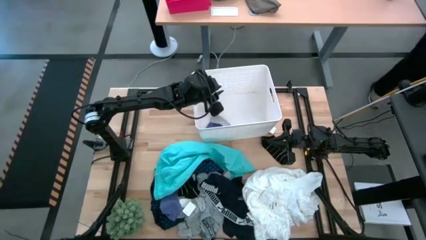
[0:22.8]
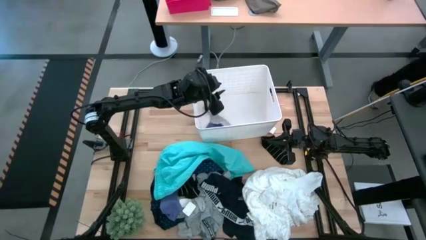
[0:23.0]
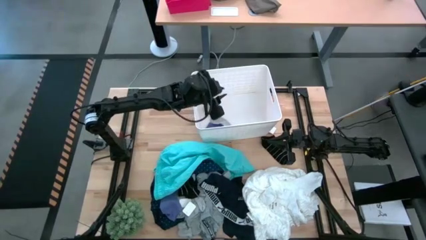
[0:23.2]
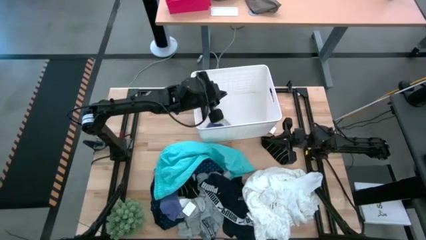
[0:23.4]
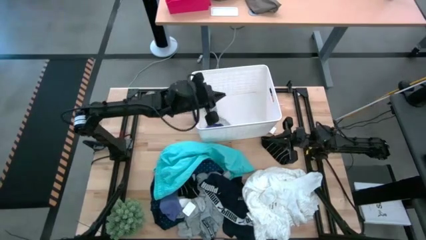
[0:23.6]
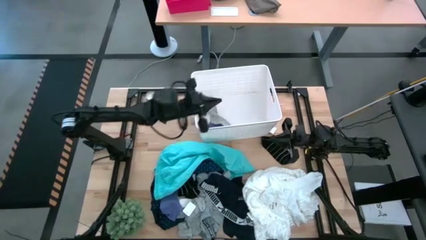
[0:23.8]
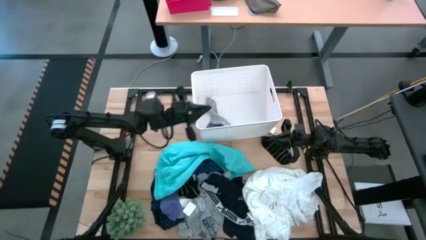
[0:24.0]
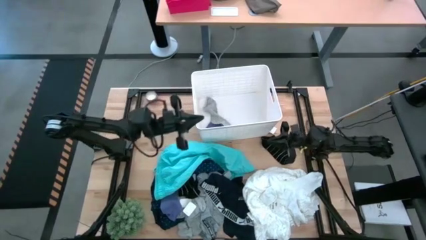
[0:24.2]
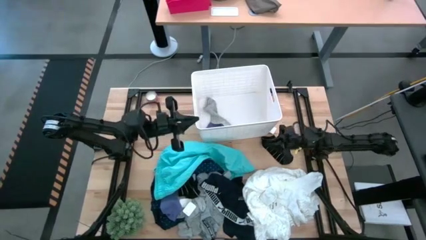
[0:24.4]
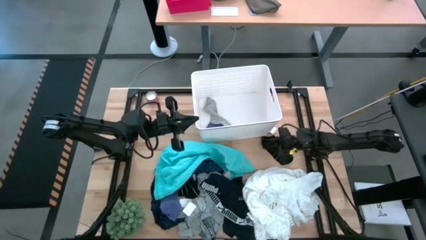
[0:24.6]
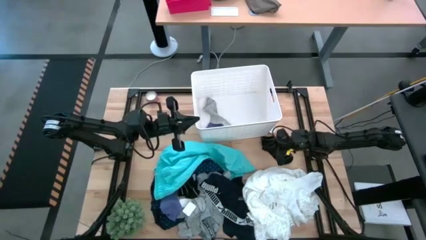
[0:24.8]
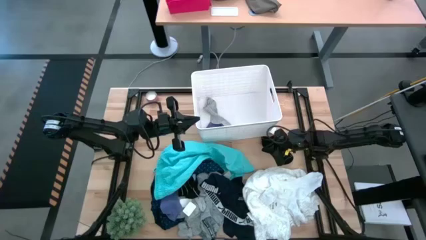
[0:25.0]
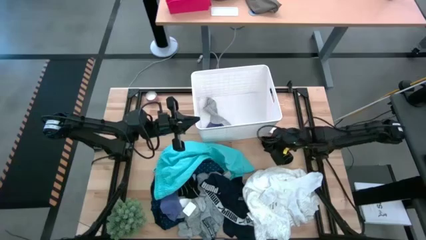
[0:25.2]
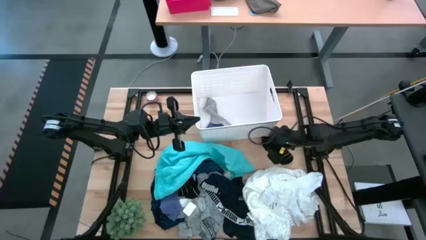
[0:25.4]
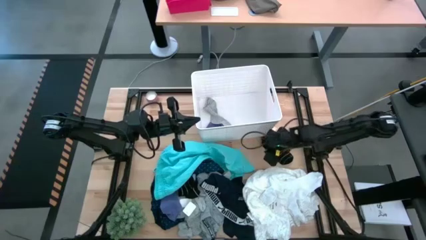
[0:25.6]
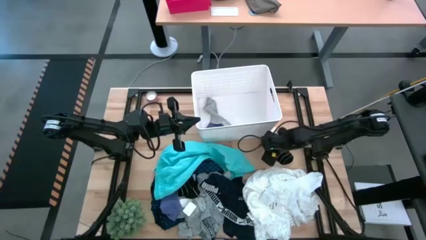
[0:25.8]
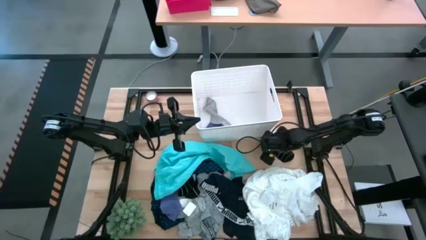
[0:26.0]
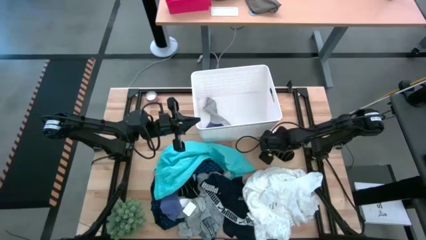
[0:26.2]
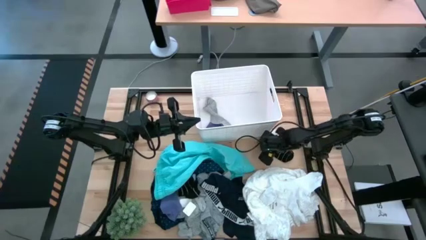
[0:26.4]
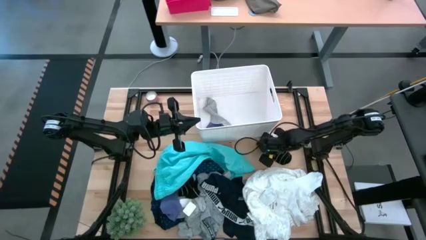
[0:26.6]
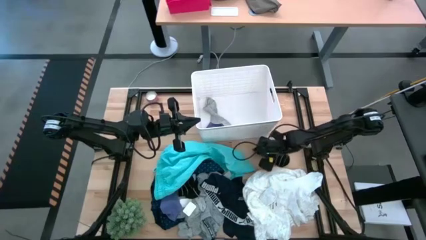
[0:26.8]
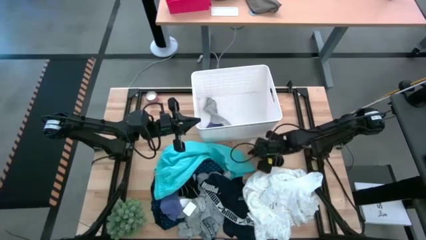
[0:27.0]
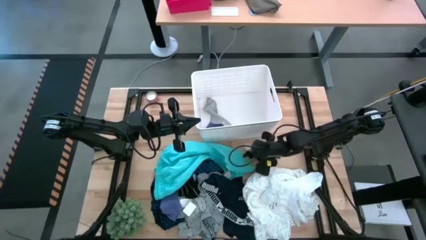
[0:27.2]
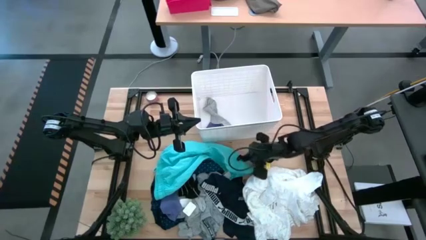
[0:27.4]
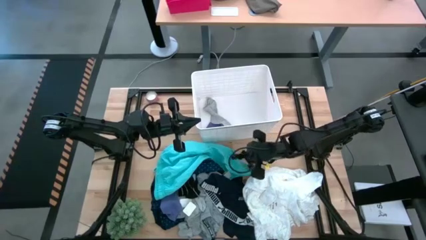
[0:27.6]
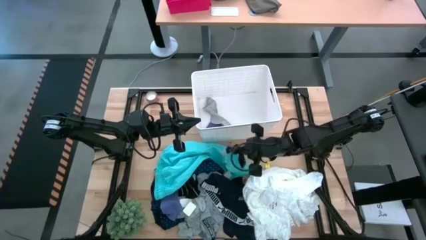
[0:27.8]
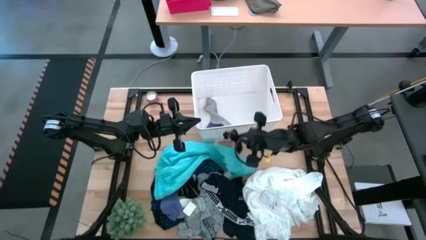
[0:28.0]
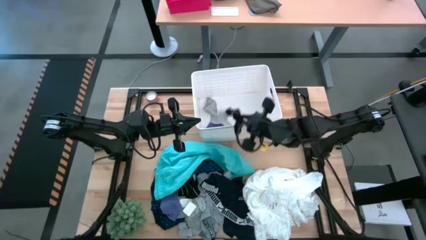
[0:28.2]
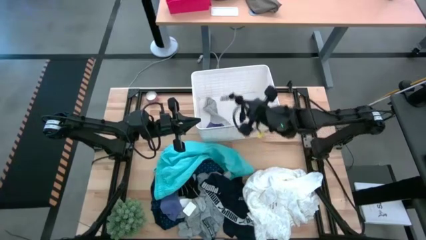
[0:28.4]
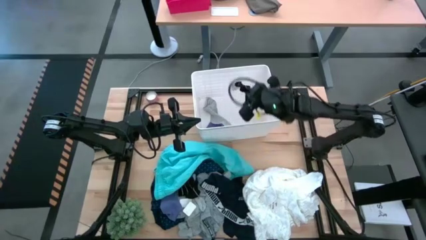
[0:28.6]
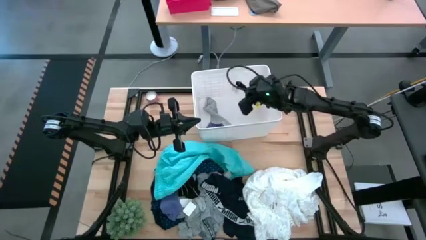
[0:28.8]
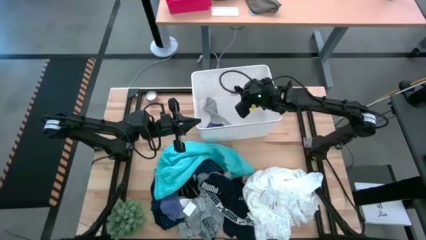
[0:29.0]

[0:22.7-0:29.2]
Task: Sort clothes
Put the black sock in the bin

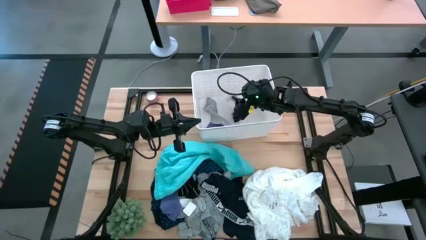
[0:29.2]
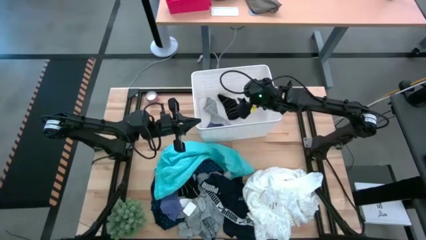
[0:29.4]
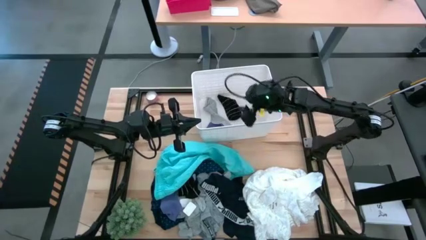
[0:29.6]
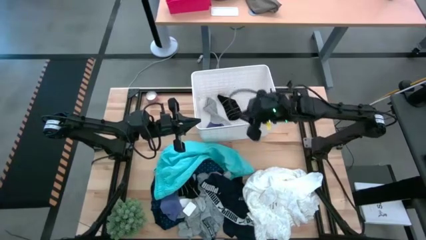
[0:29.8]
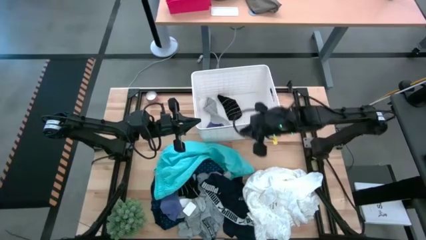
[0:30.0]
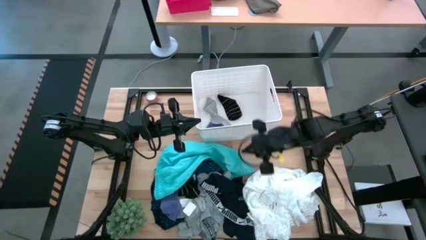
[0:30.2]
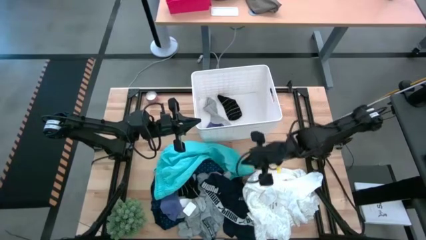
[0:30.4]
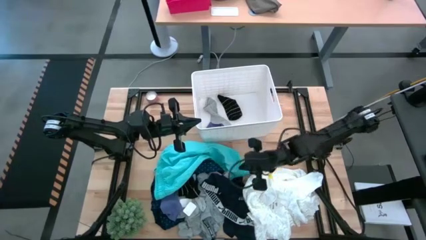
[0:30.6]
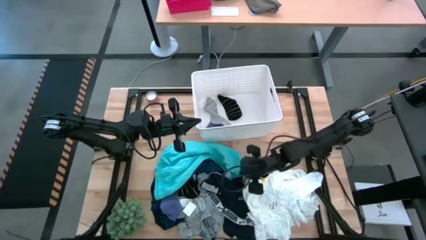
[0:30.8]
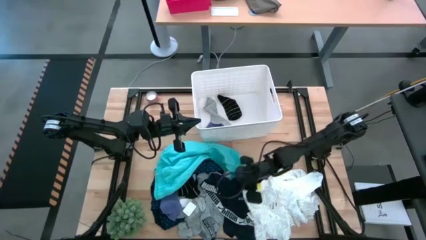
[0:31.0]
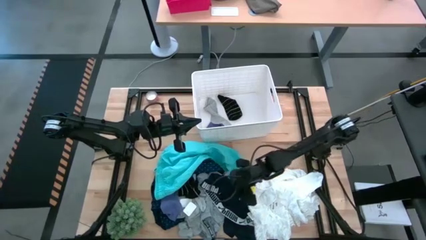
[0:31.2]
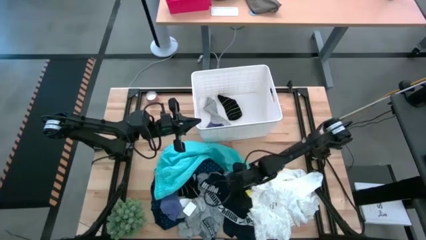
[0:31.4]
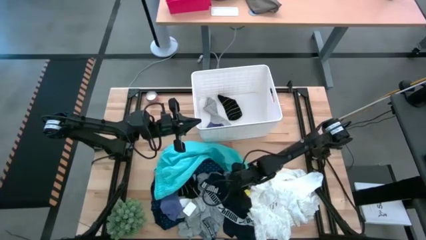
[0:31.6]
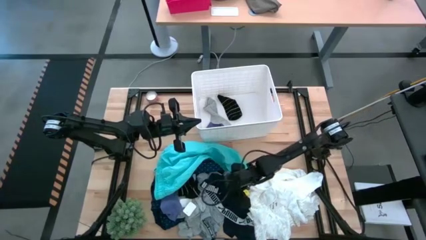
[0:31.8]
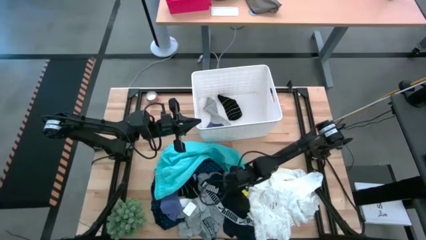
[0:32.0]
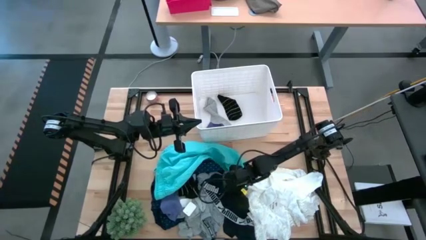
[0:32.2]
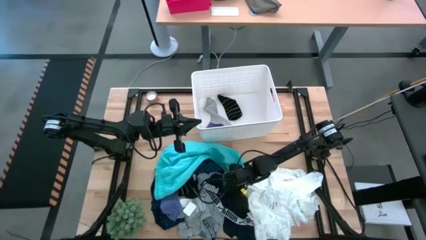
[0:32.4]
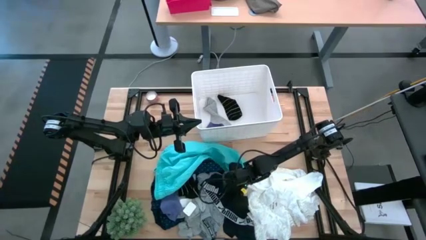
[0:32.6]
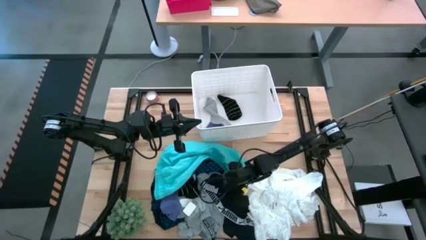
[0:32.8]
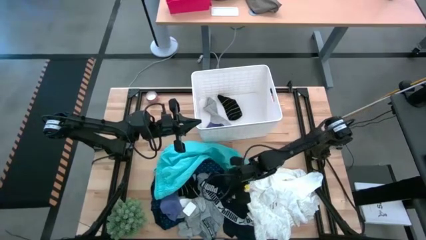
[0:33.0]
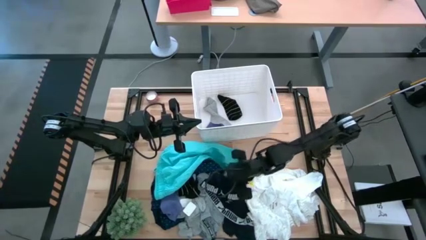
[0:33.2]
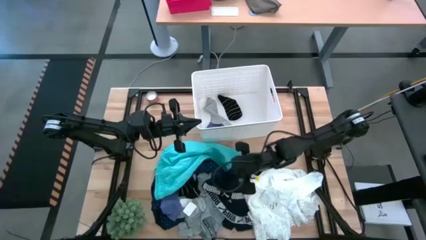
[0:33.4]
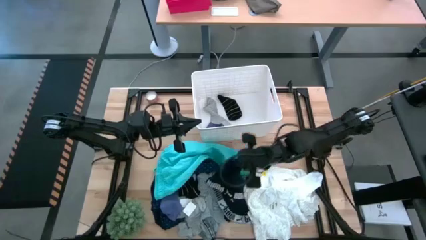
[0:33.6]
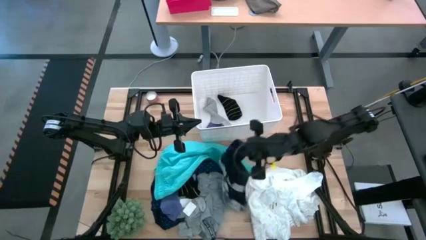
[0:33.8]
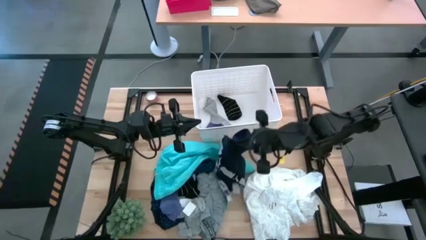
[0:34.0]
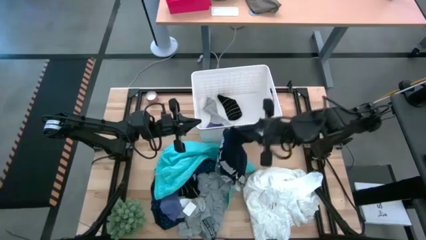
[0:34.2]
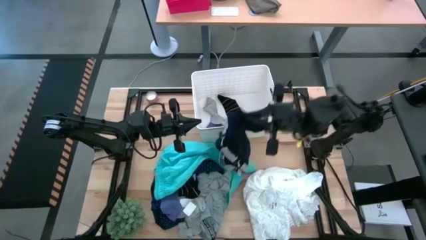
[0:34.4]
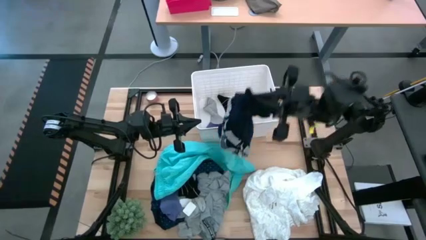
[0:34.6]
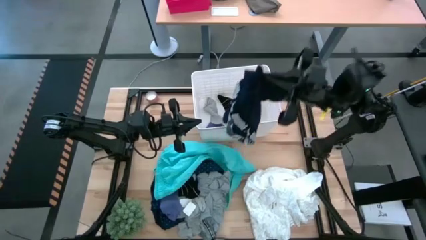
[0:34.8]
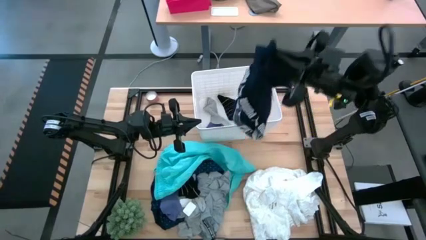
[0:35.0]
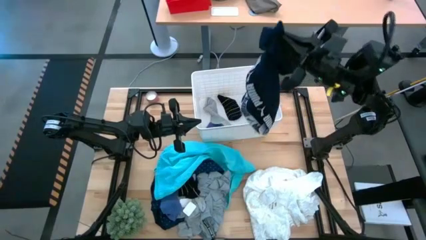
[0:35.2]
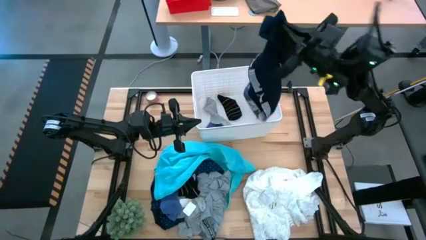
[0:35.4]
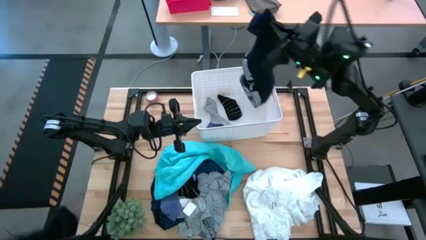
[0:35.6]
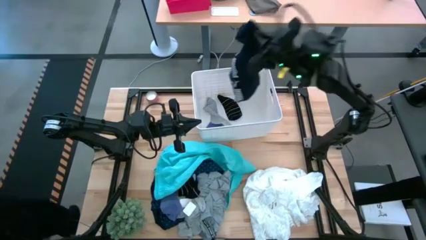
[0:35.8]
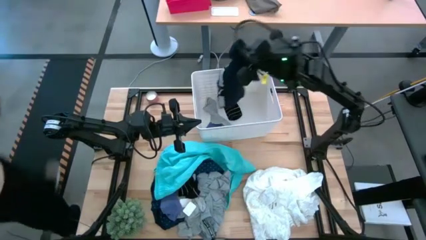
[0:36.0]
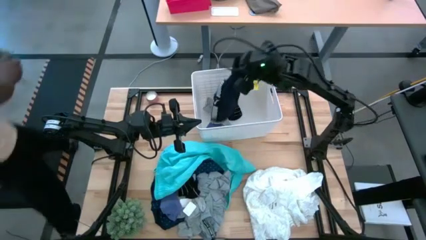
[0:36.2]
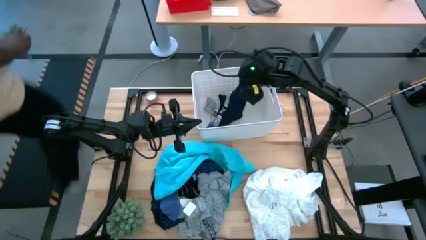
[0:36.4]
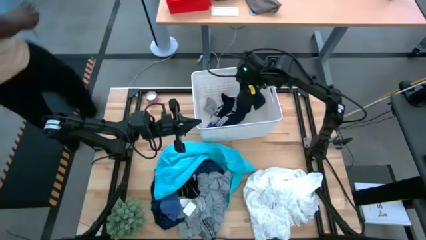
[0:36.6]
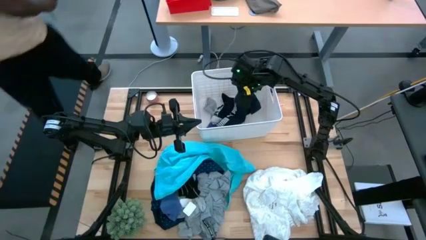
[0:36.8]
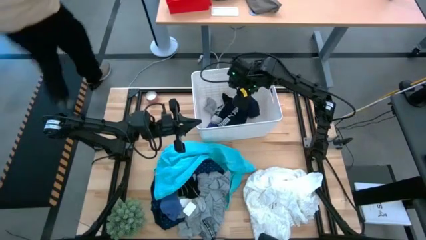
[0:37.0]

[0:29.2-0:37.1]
Put the underwear in the bin
